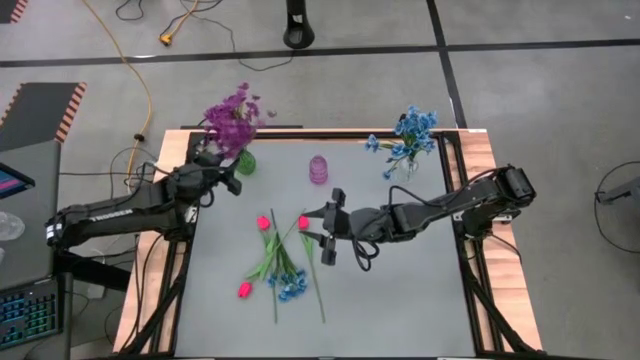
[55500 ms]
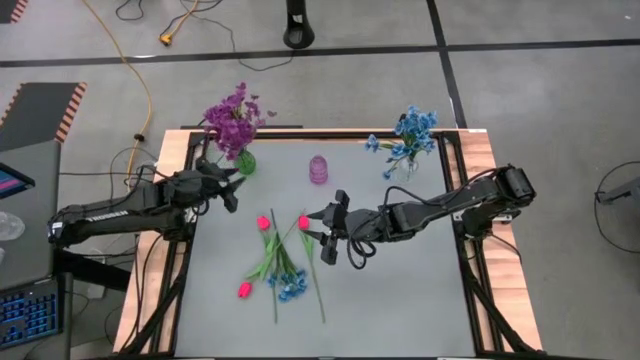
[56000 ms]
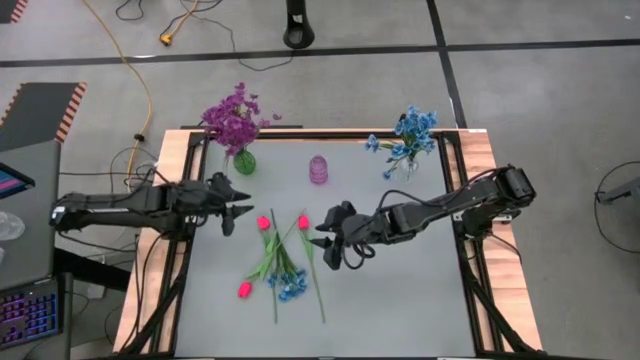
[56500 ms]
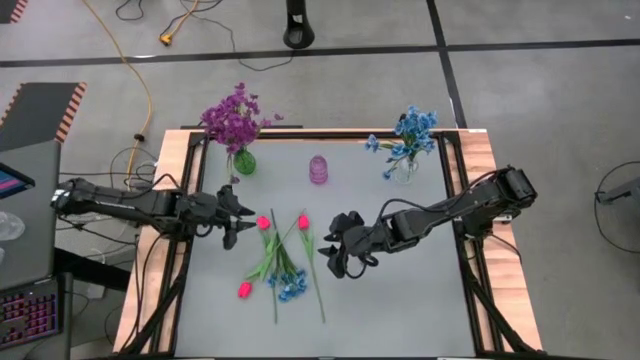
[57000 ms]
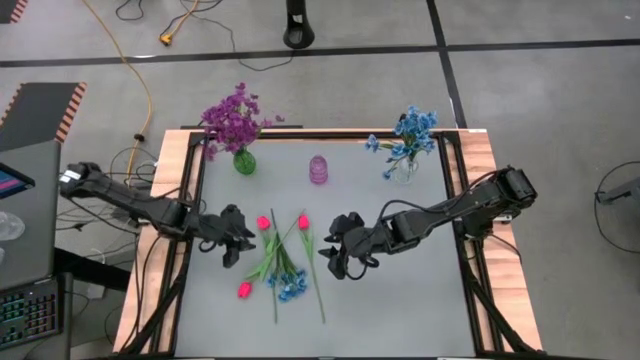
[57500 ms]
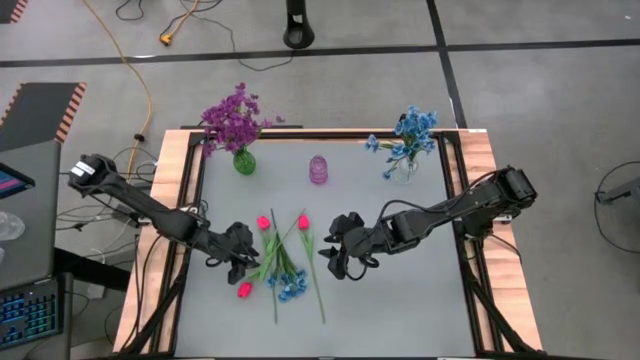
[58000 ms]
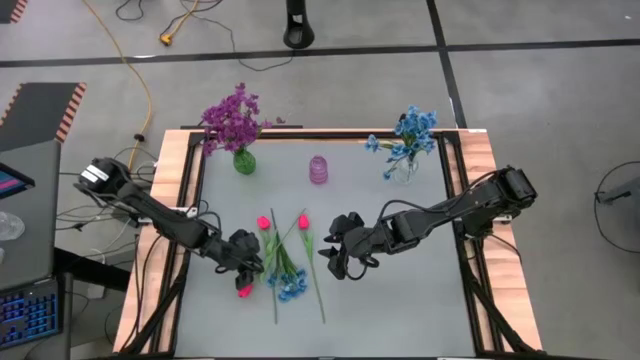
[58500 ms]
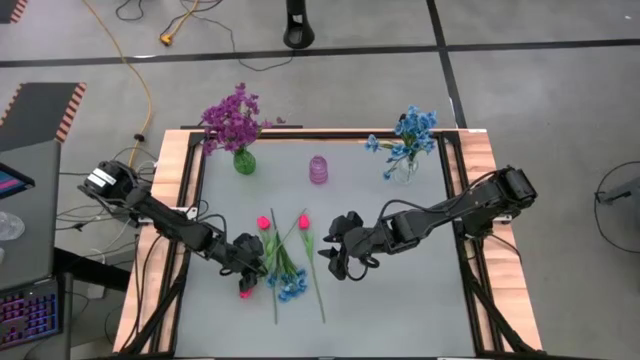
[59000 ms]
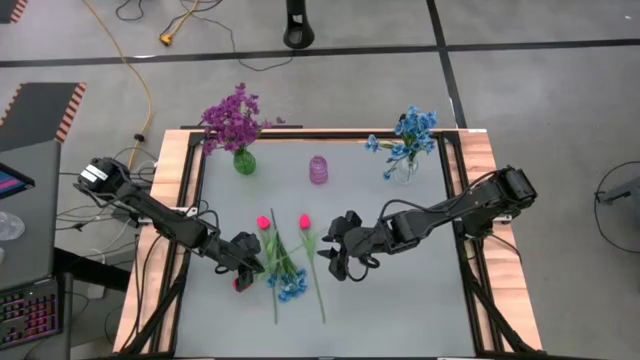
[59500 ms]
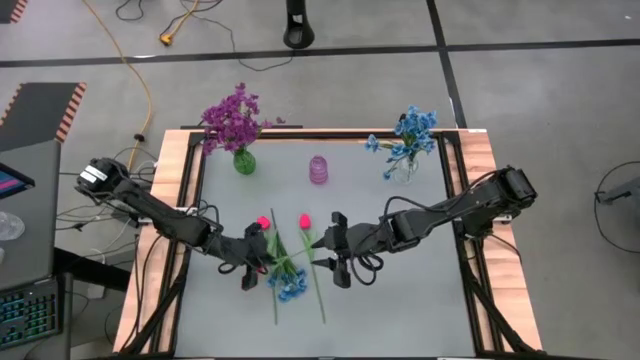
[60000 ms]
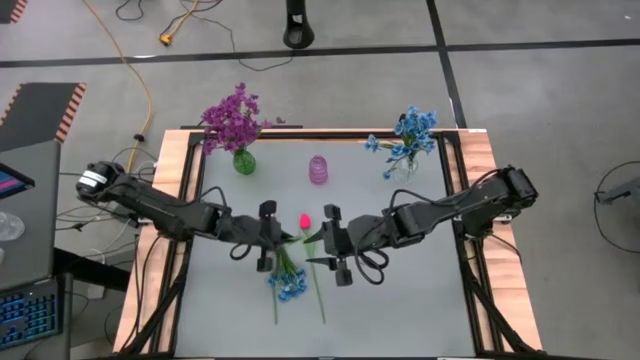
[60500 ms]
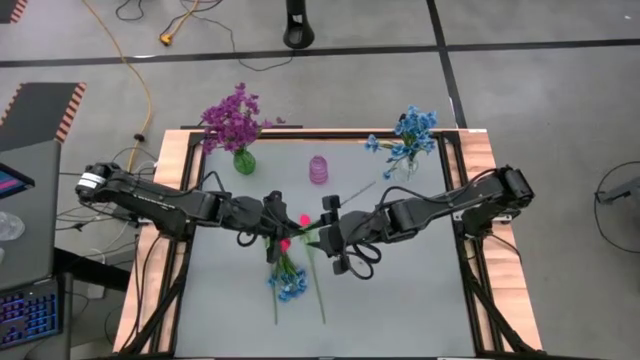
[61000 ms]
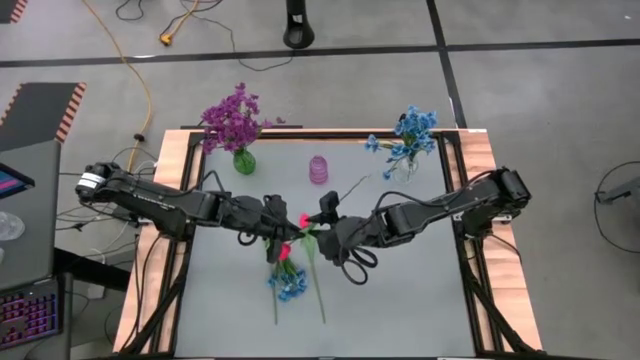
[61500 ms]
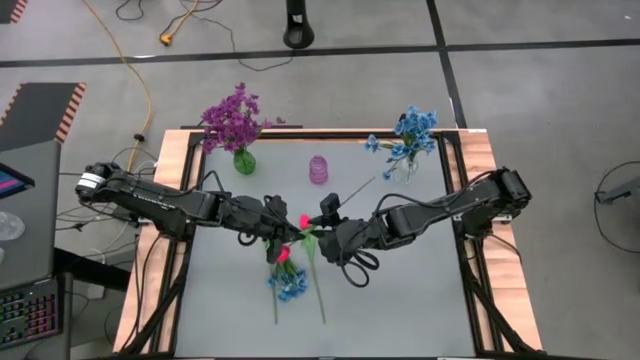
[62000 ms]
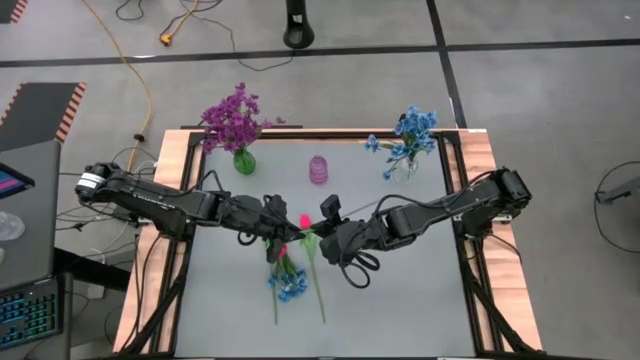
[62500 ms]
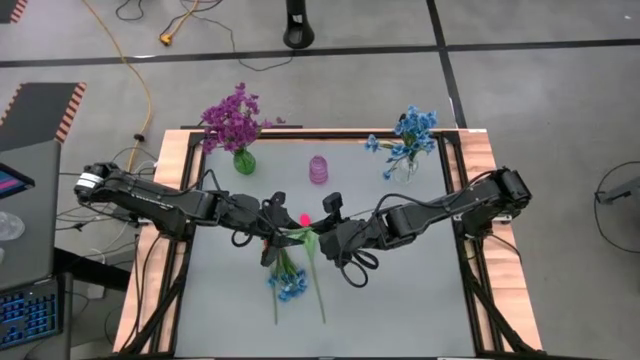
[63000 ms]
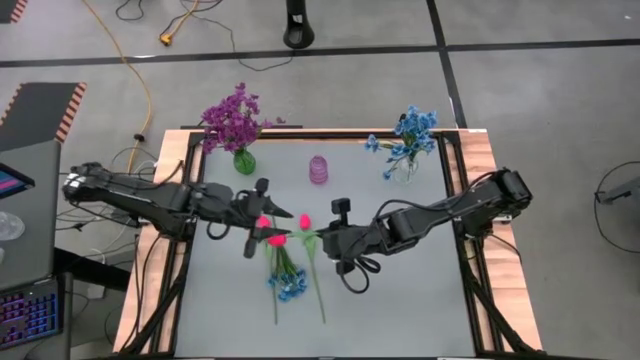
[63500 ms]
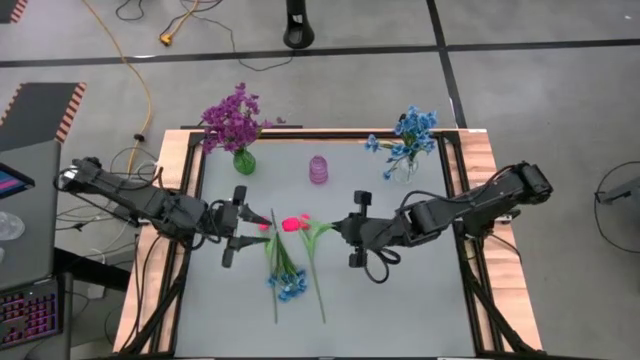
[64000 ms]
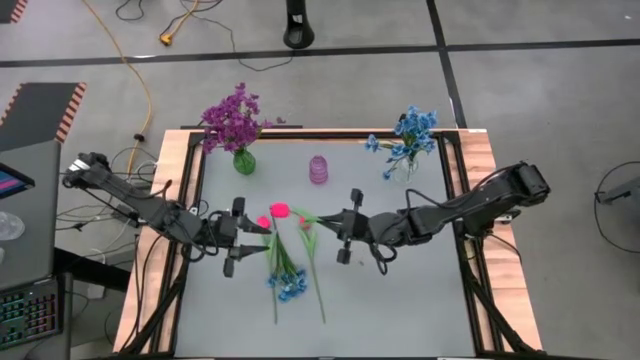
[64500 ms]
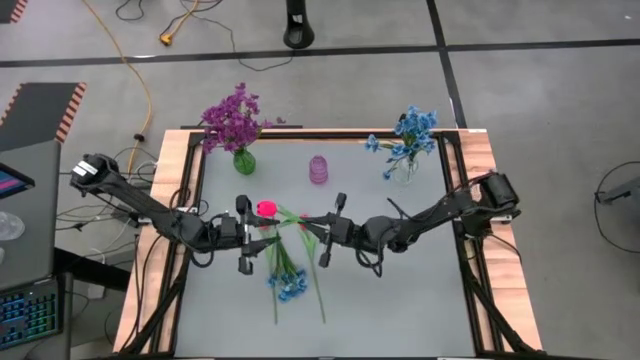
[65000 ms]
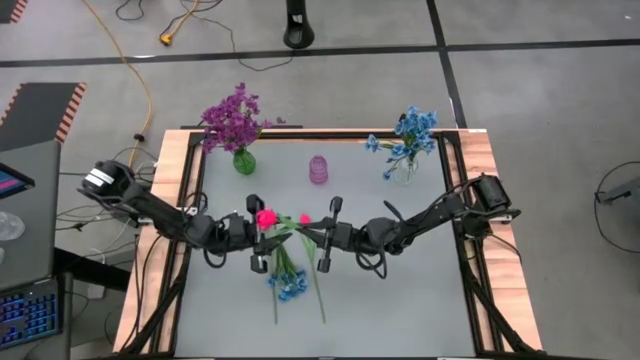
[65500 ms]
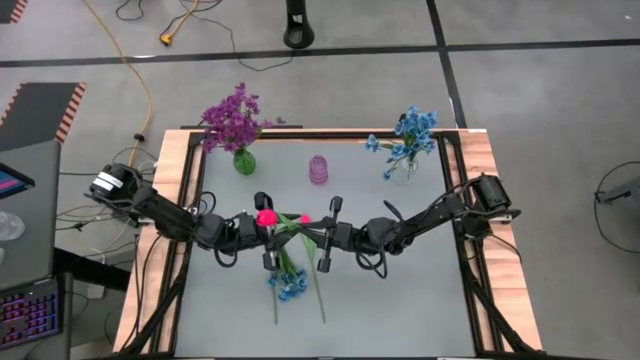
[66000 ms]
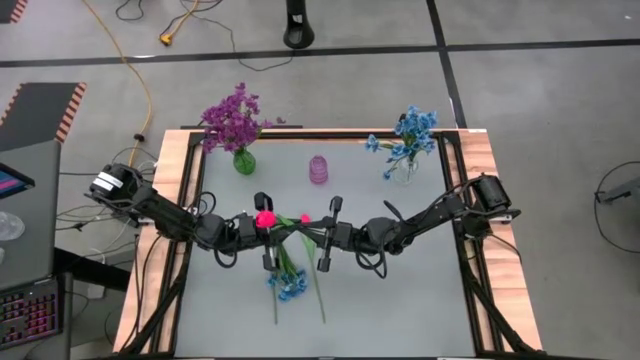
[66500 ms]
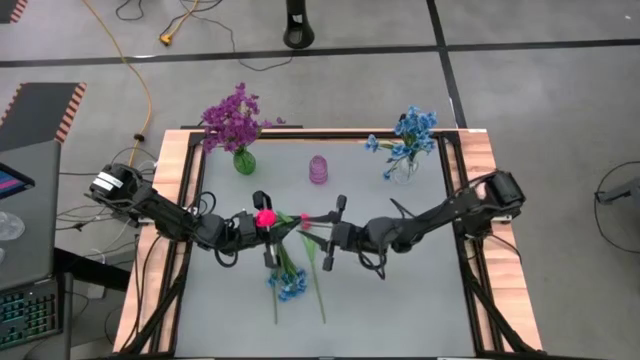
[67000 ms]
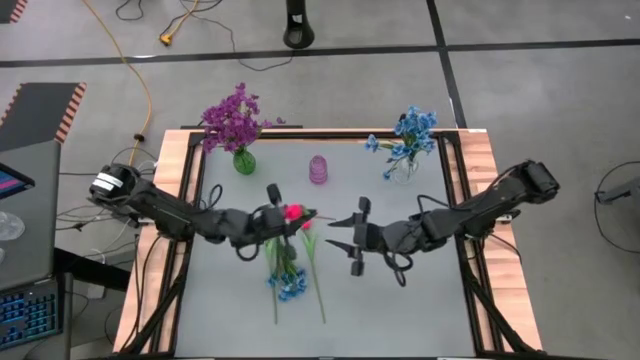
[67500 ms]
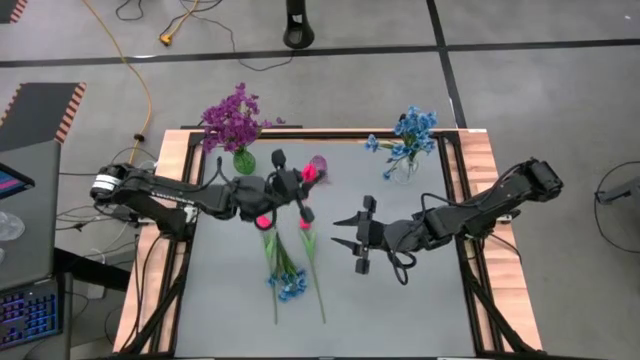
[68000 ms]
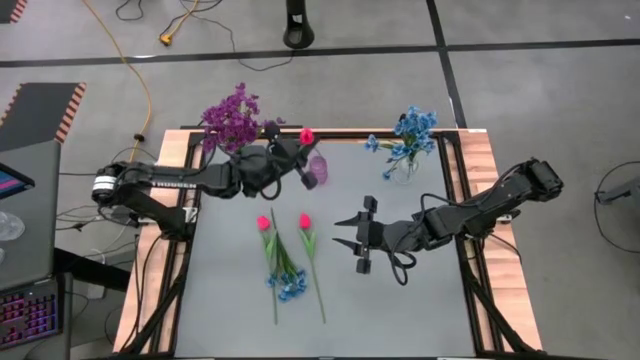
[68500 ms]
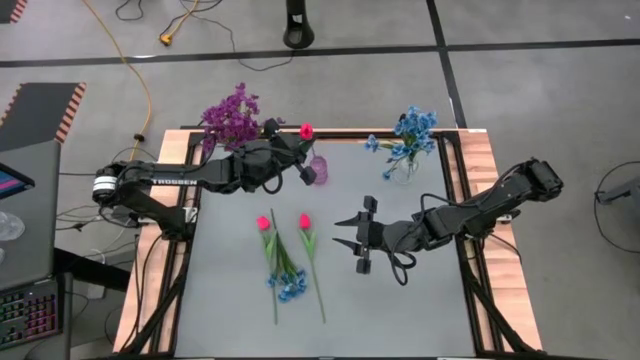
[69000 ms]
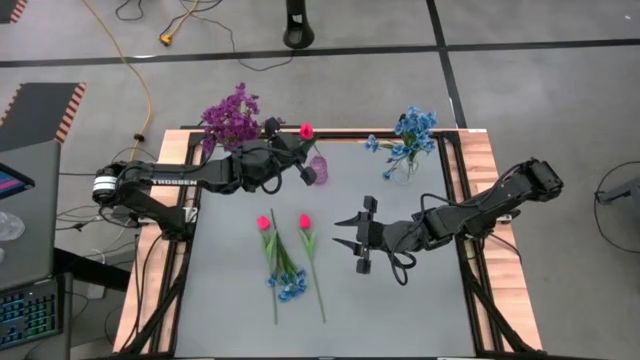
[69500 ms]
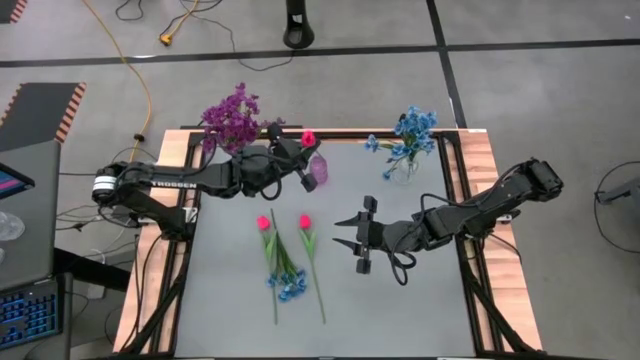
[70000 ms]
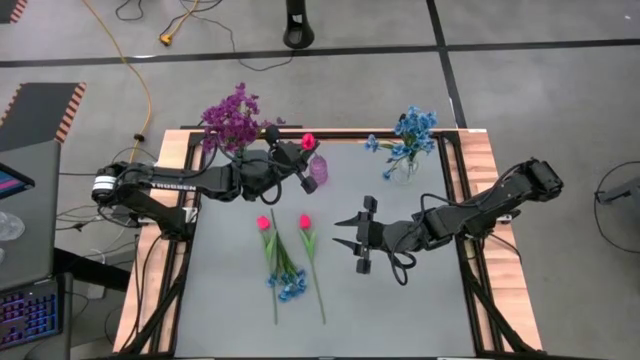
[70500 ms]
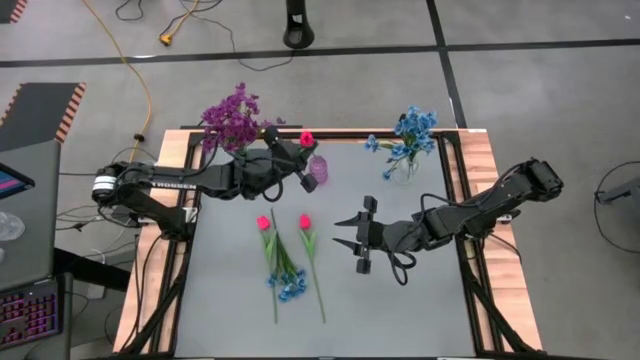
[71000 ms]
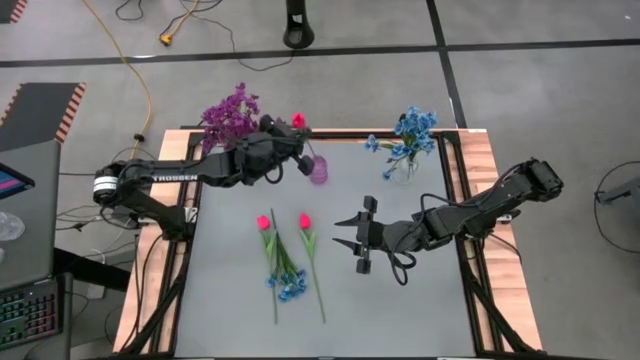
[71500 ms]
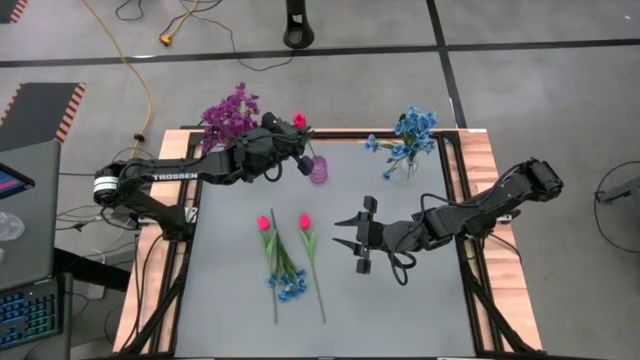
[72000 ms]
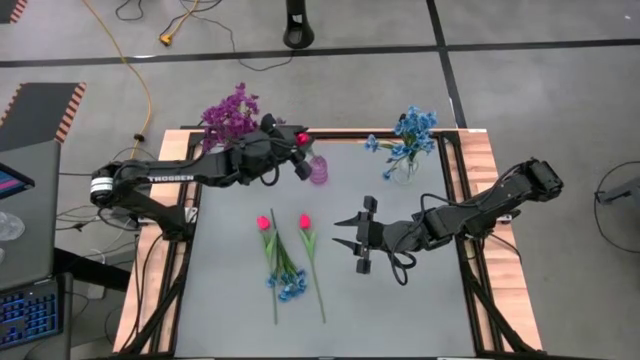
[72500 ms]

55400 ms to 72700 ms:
Task: Sort flowers into vase by color
Put the left pink flower into the purple vase

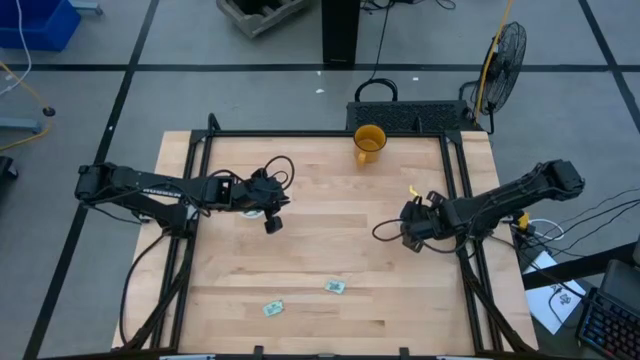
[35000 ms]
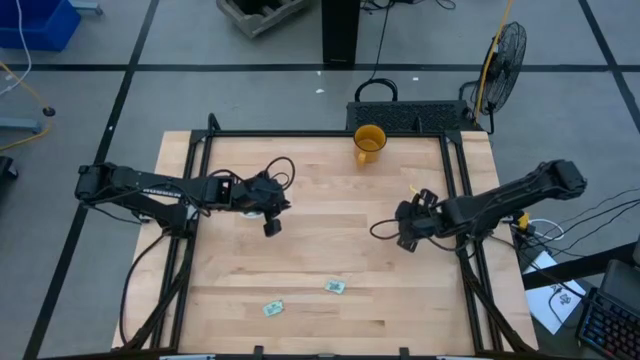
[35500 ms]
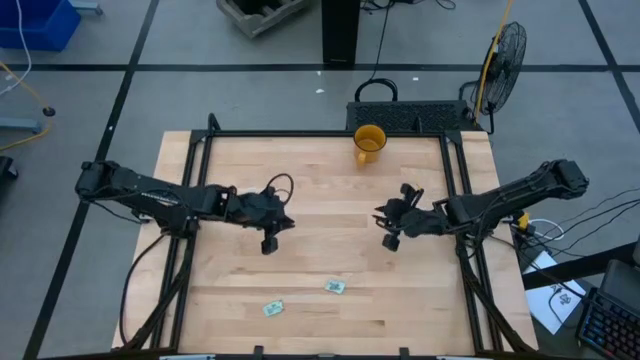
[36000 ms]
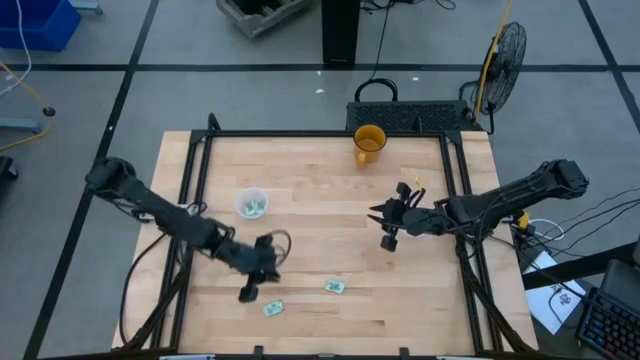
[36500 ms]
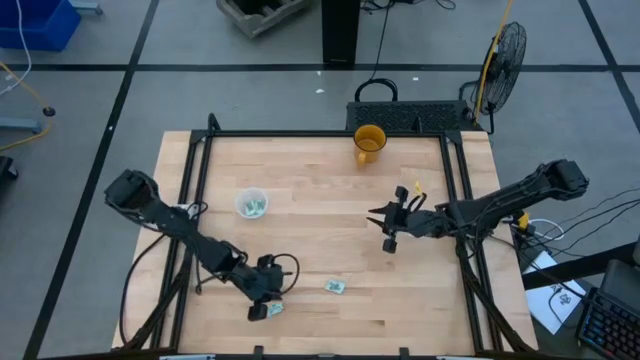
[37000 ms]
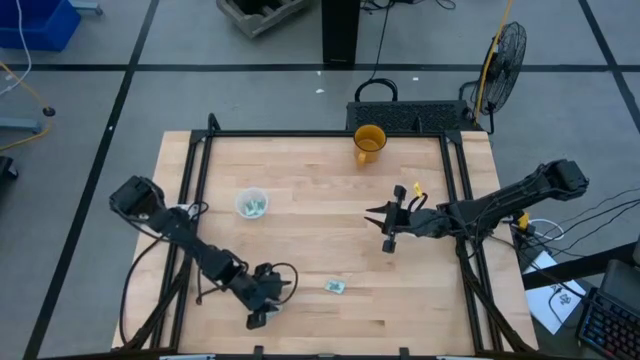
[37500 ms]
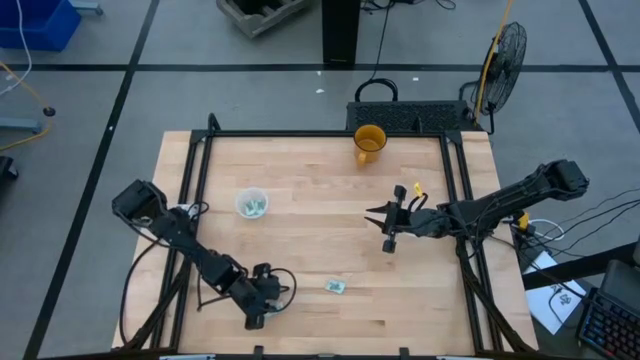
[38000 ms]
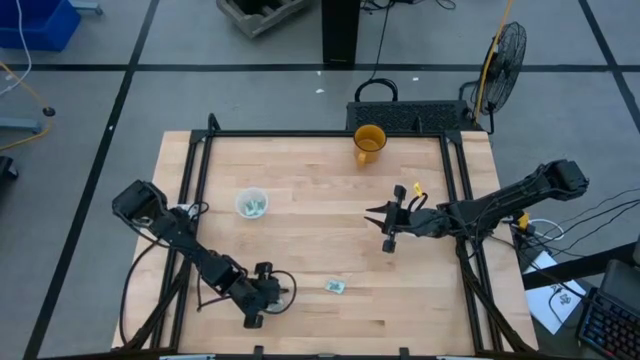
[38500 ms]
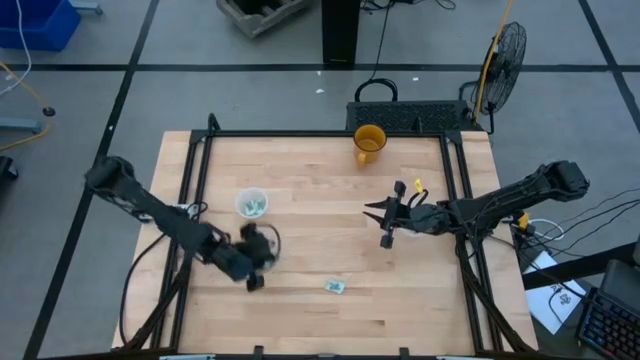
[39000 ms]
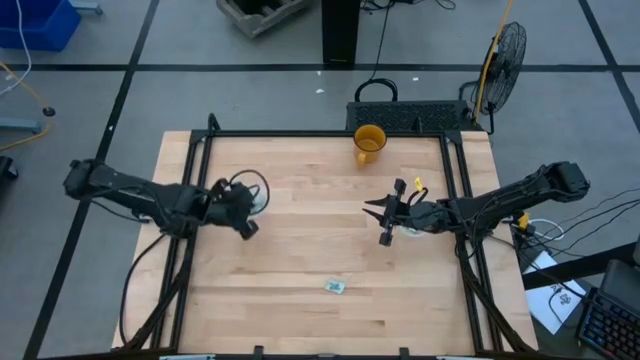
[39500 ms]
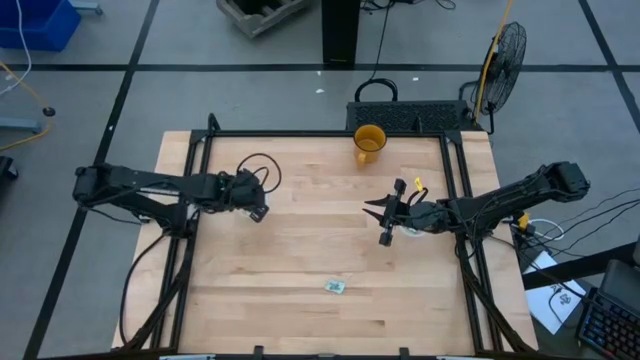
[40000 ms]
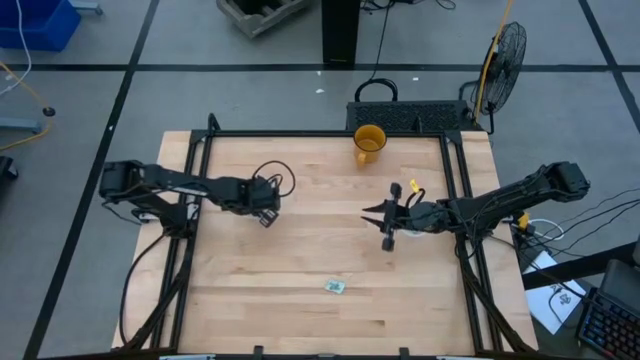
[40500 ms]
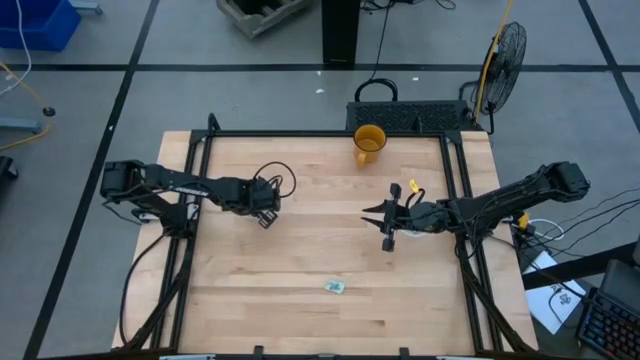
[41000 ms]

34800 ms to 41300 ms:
Task: Pick and place Stevia / Truvia into bins
Put the stevia packet into the left transparent container
